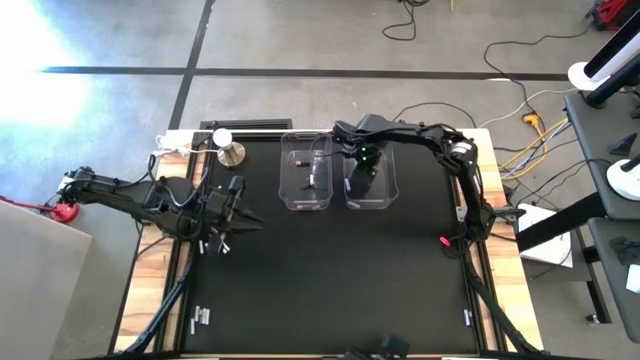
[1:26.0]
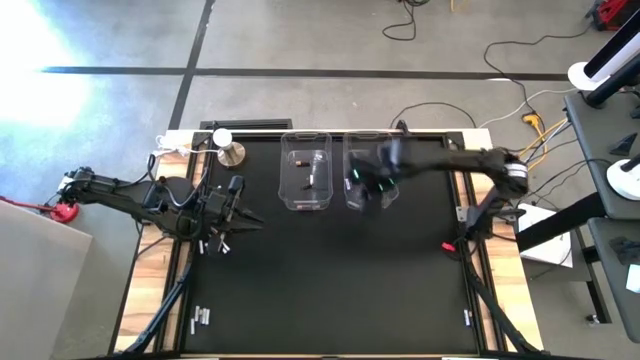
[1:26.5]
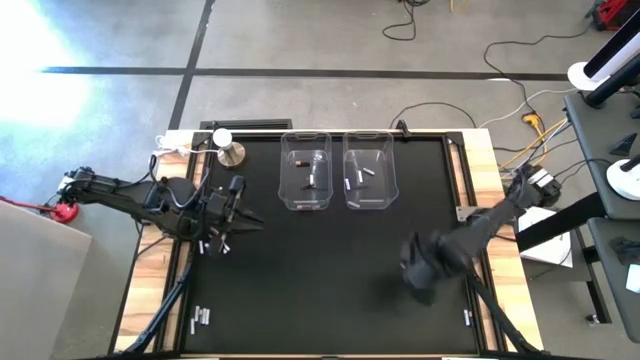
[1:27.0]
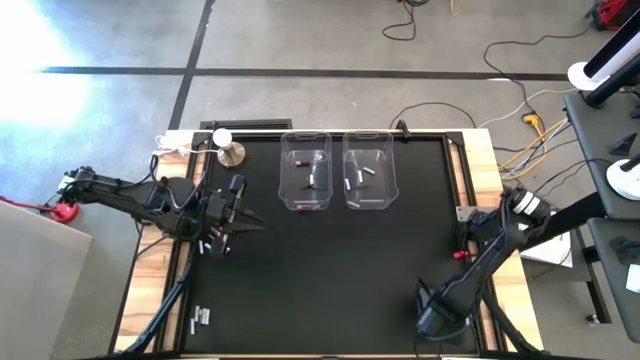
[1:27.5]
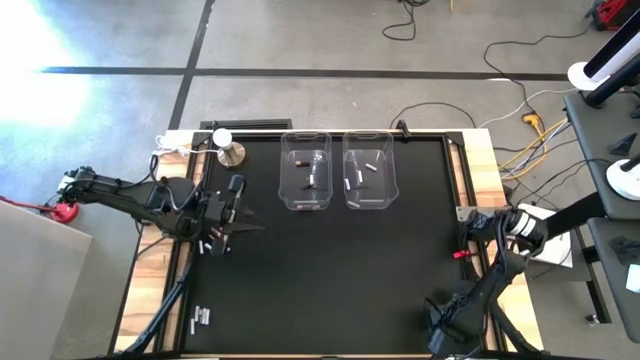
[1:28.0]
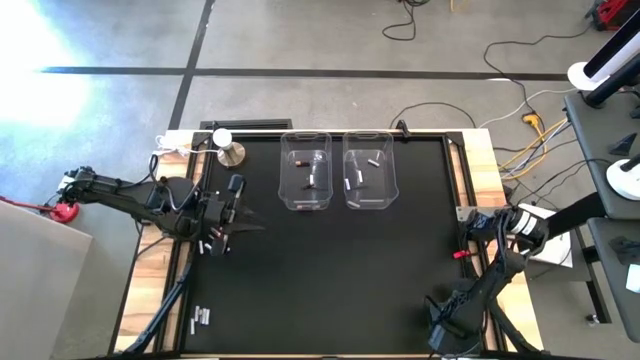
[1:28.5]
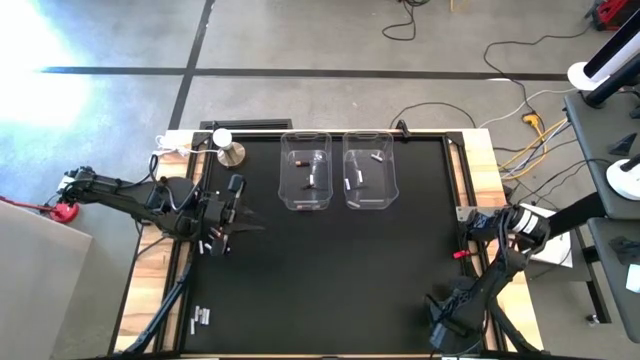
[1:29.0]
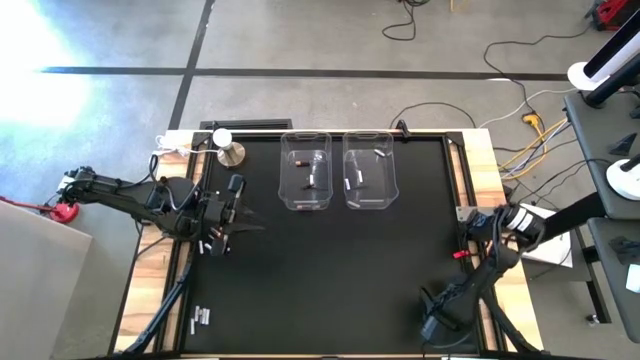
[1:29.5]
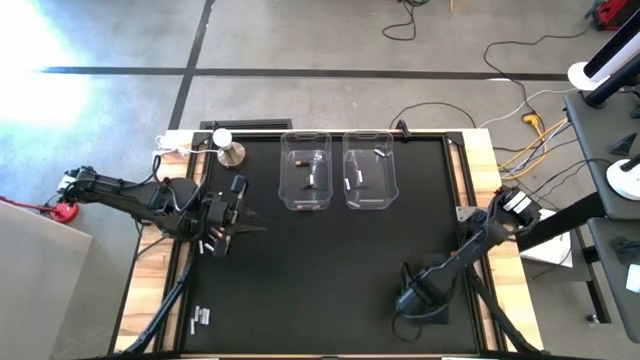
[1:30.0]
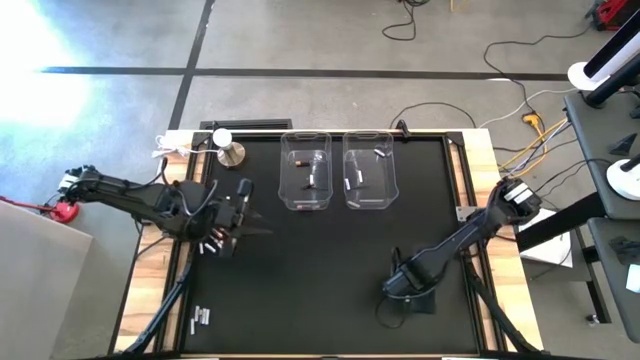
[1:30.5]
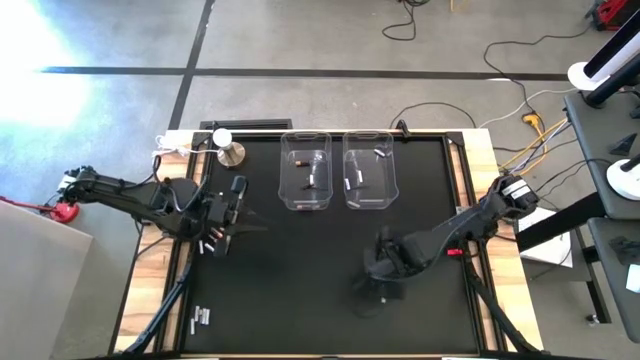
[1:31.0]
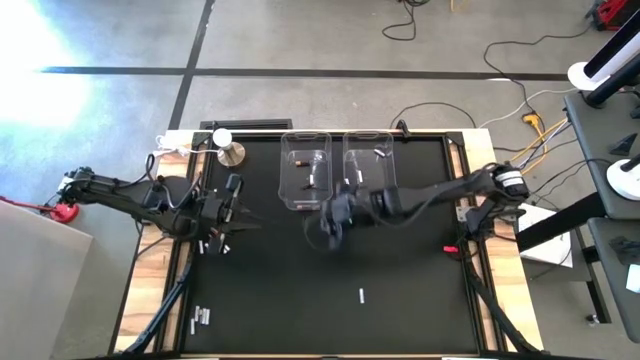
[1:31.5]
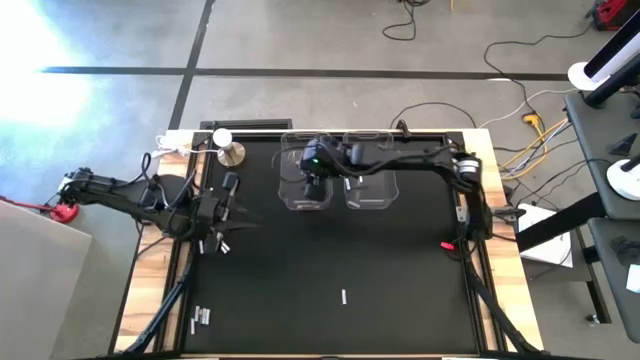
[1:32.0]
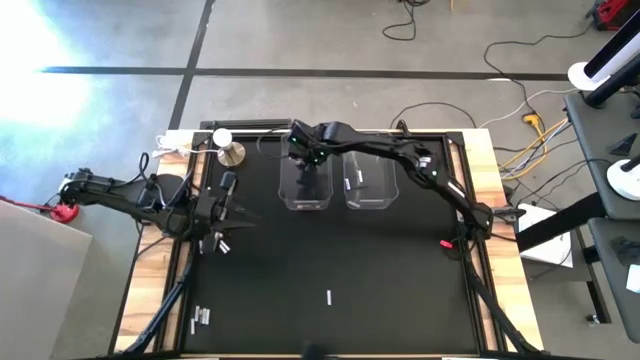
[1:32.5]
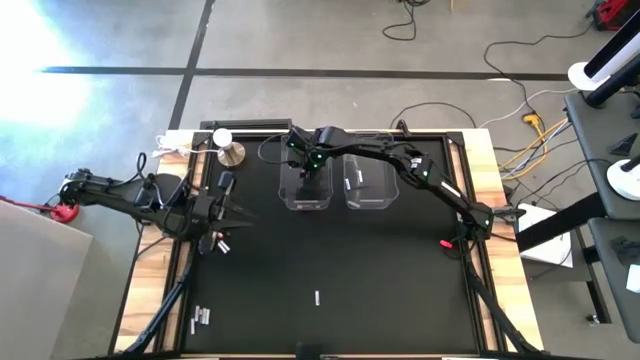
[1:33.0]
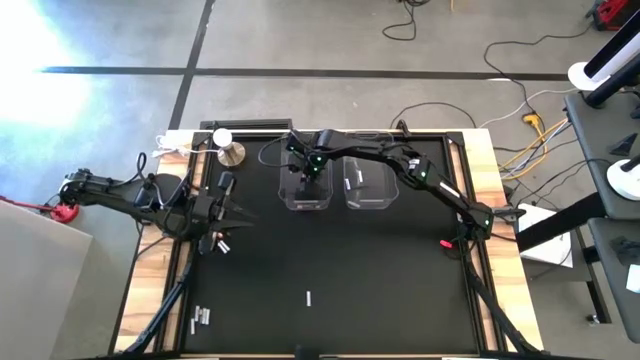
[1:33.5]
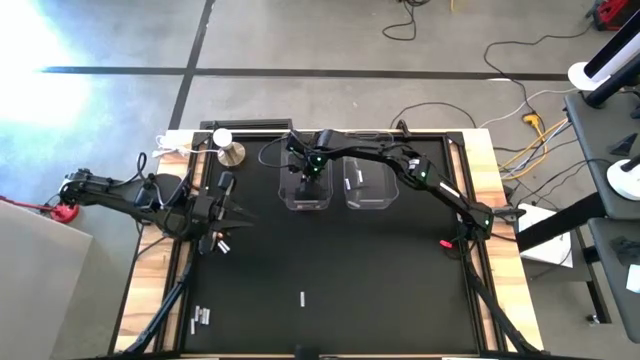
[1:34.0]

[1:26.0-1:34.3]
Task: Sort batteries
Put the black battery into the left transparent bin

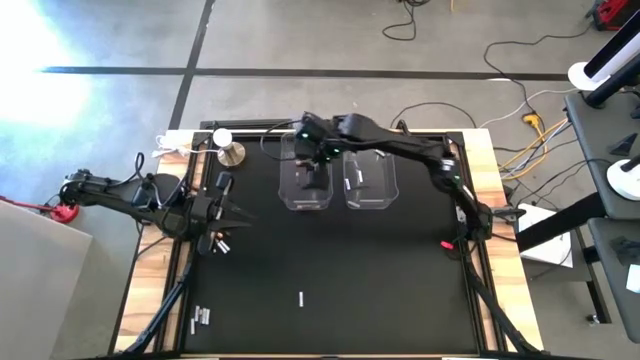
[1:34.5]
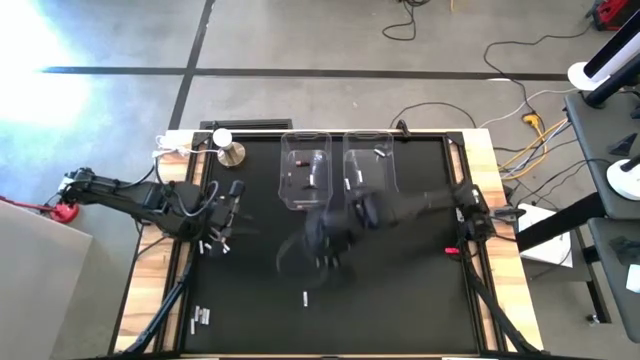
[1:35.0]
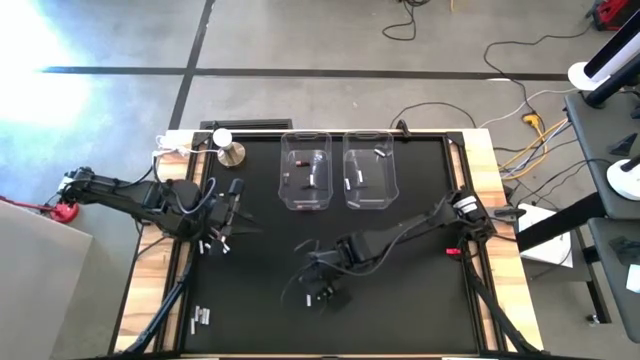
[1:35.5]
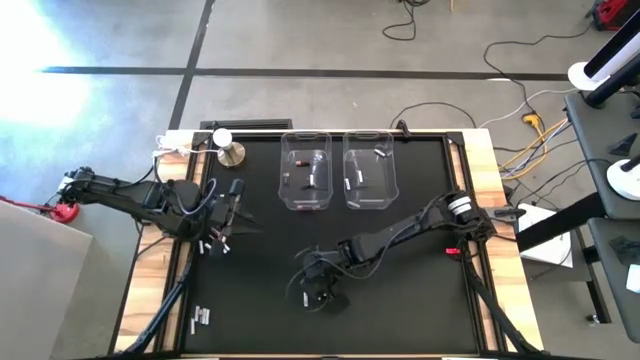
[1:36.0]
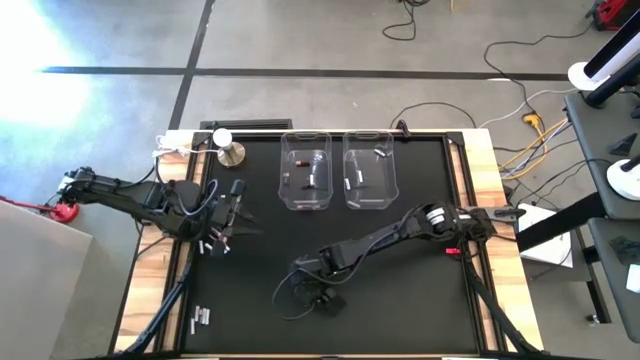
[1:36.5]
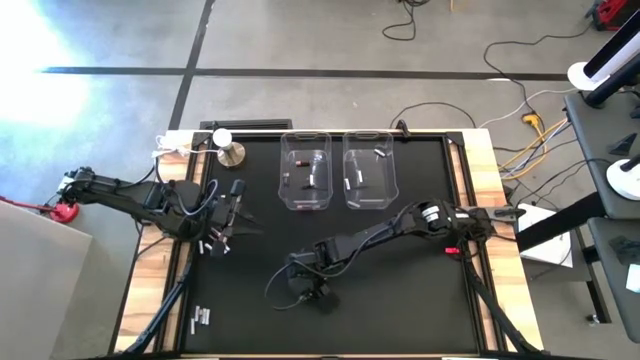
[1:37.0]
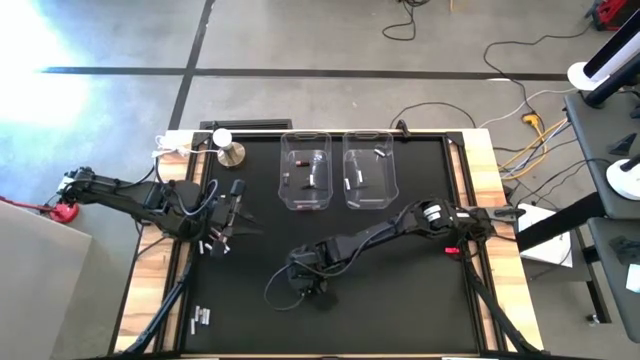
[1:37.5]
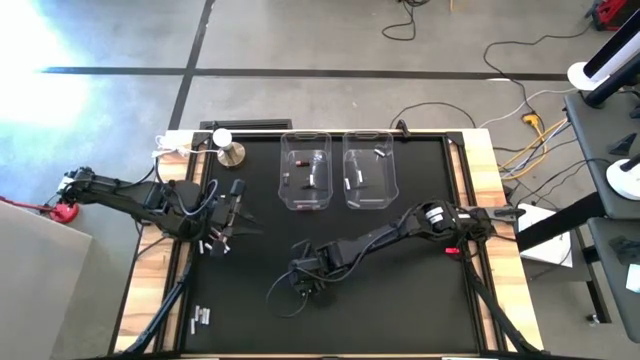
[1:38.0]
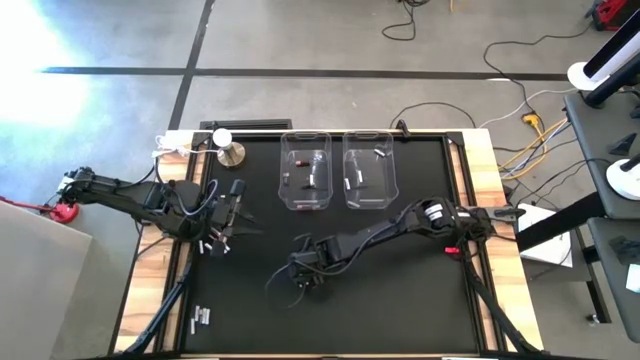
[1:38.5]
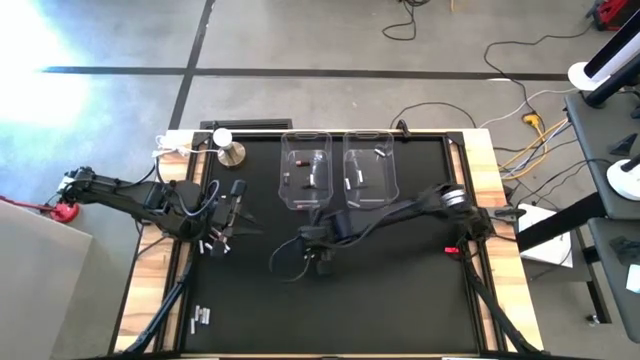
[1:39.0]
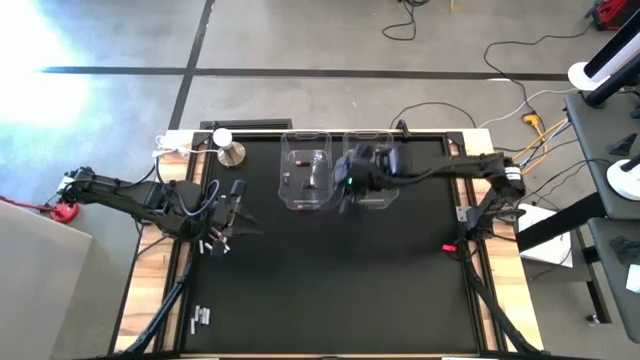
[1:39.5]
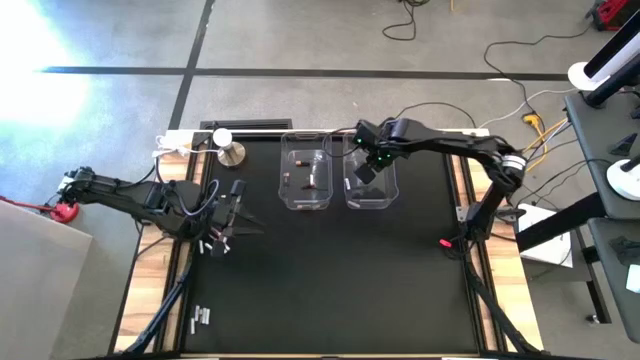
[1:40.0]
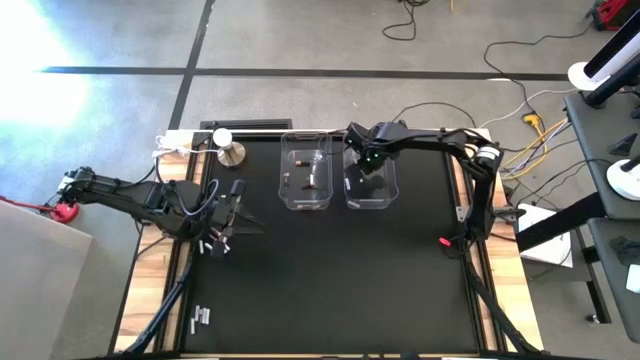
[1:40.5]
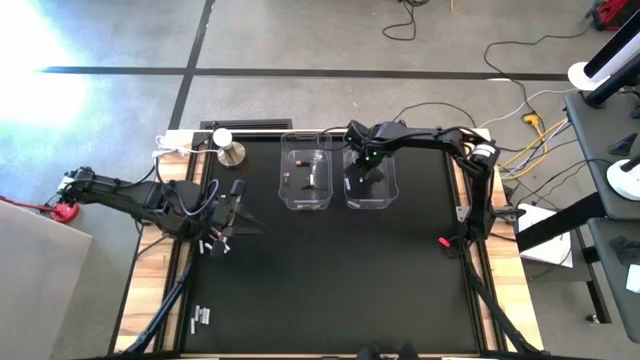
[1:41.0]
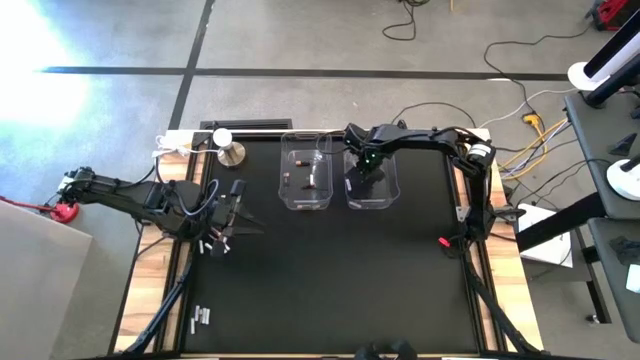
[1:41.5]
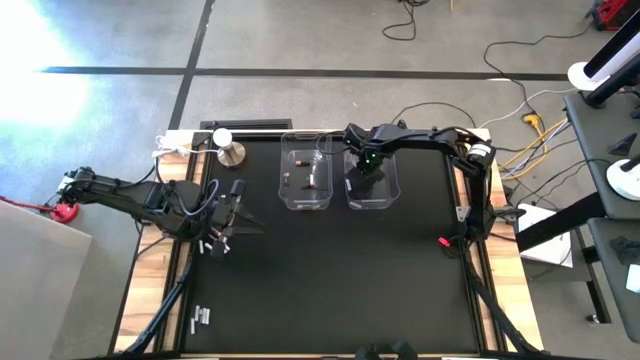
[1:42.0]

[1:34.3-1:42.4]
Put the white battery into the right transparent bin

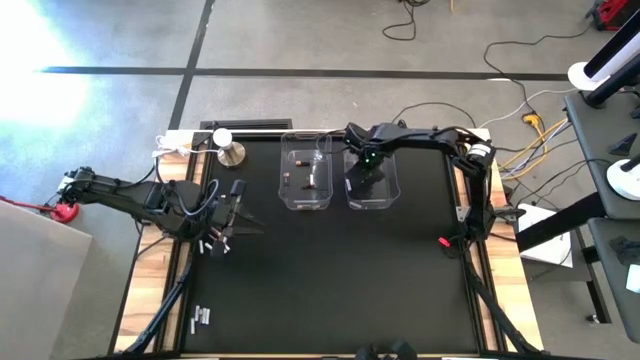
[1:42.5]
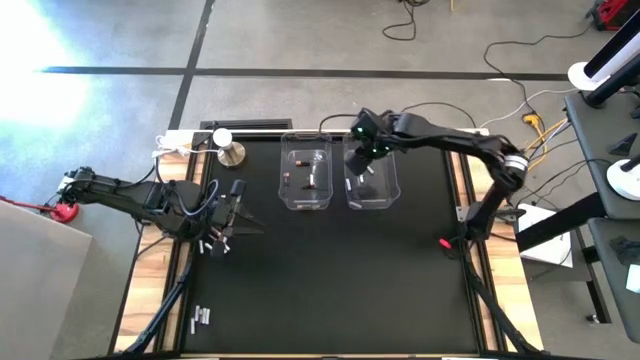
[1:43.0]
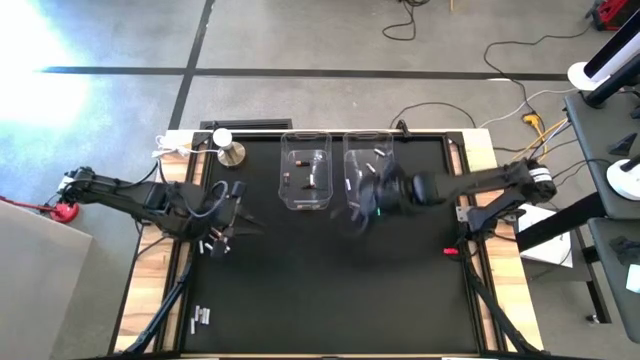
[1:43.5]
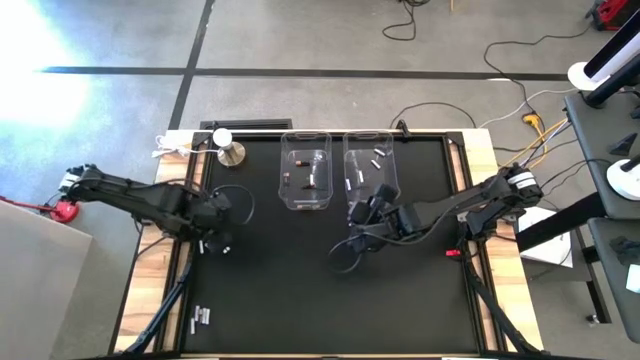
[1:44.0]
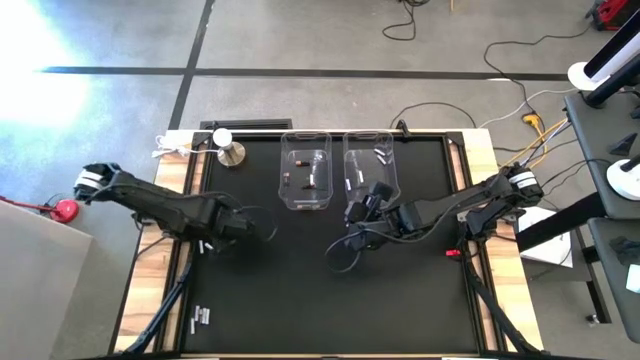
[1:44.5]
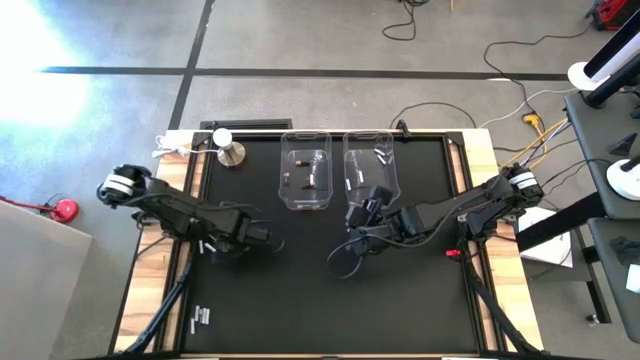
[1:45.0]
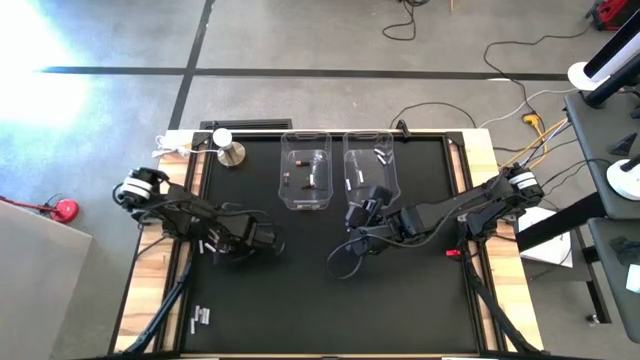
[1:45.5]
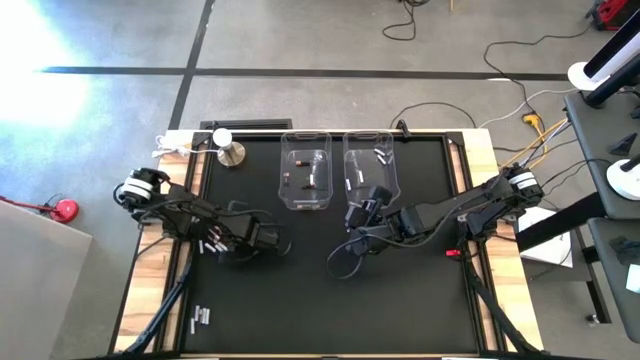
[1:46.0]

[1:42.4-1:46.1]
Put the black battery into the left transparent bin

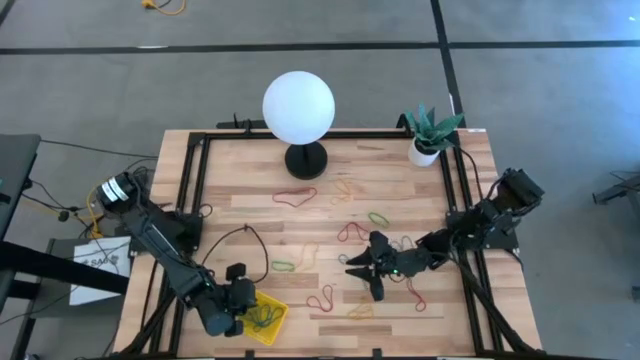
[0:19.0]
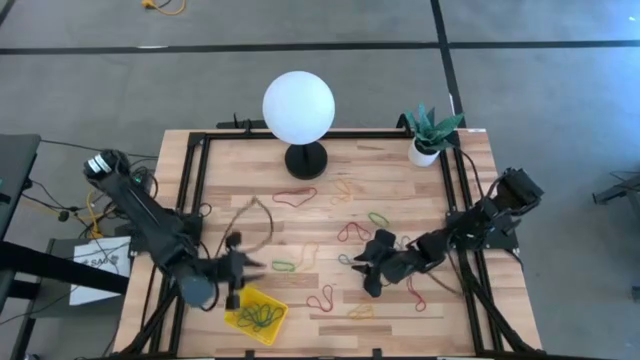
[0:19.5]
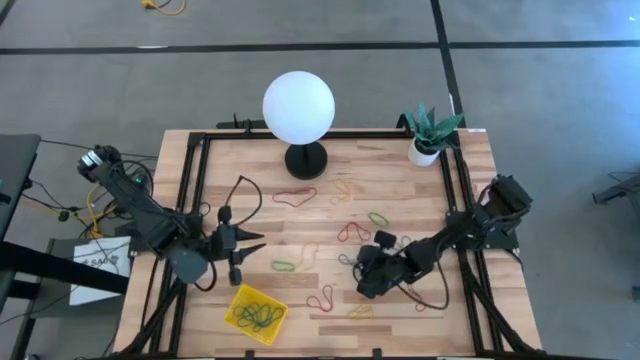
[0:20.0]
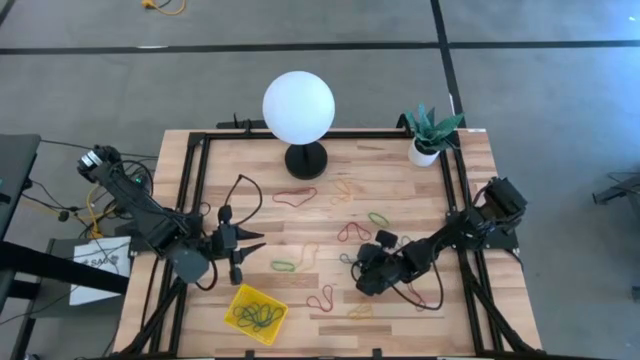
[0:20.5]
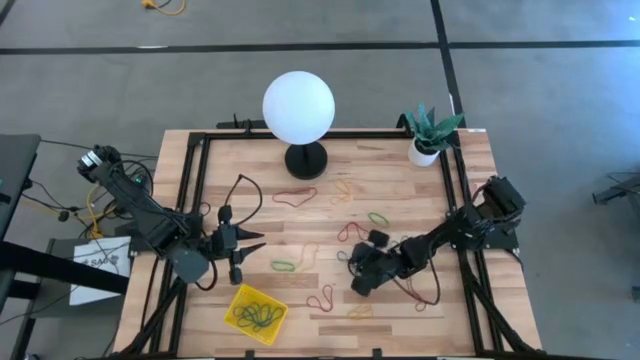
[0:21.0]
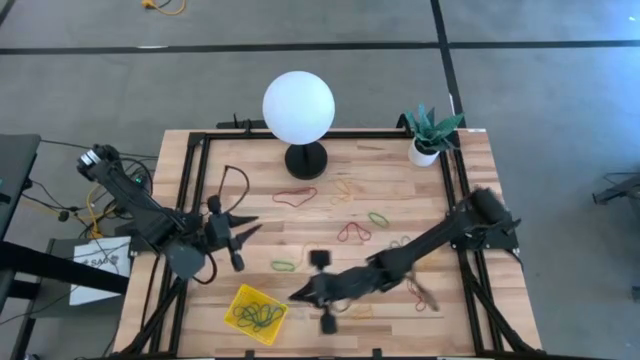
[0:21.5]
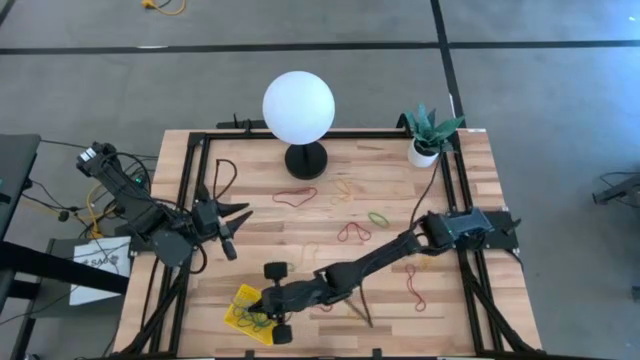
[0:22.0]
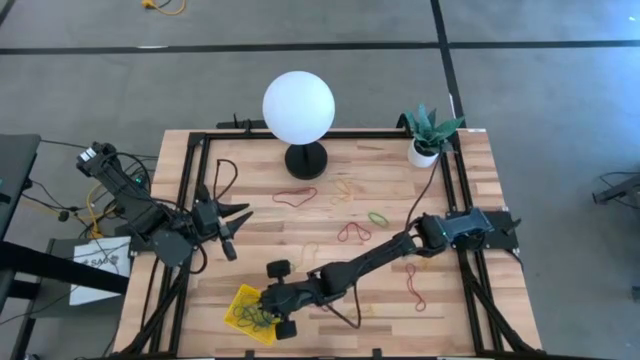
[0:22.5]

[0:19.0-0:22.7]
Task: Pick and place items into bin
Put the blue rubber band into the yellow bin
